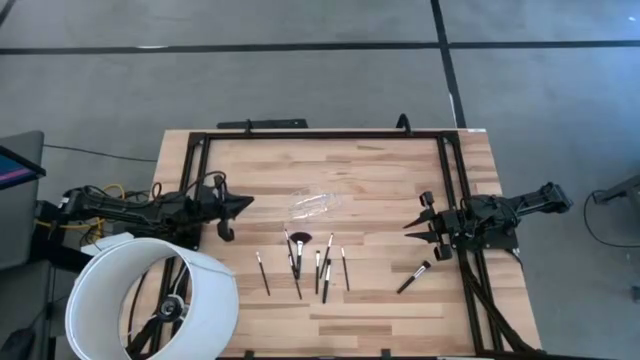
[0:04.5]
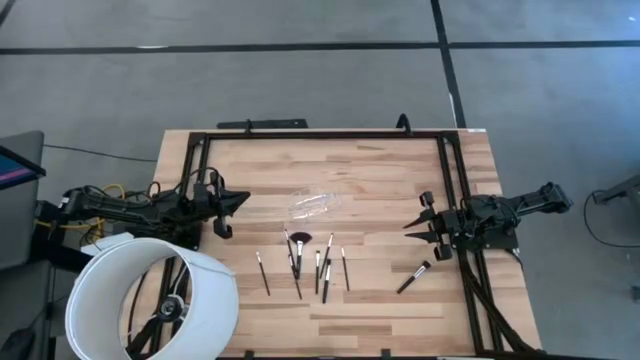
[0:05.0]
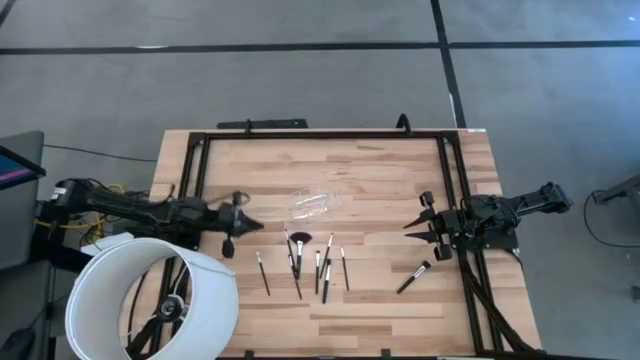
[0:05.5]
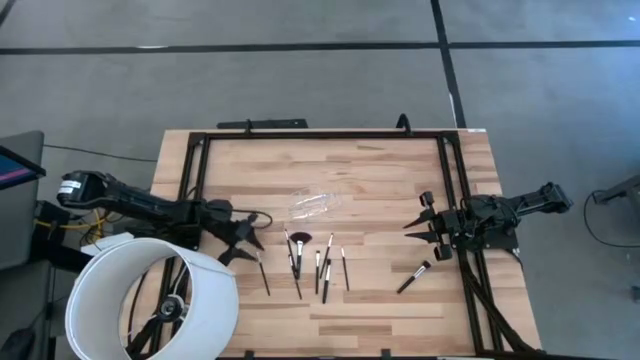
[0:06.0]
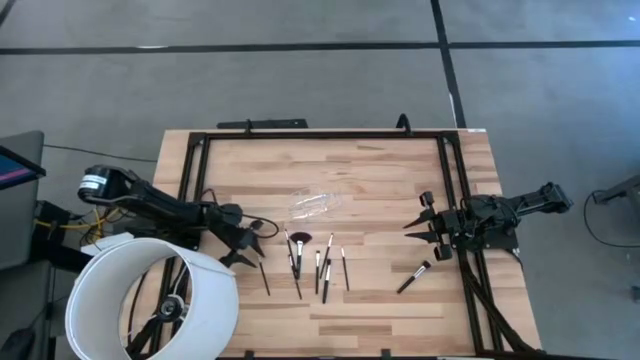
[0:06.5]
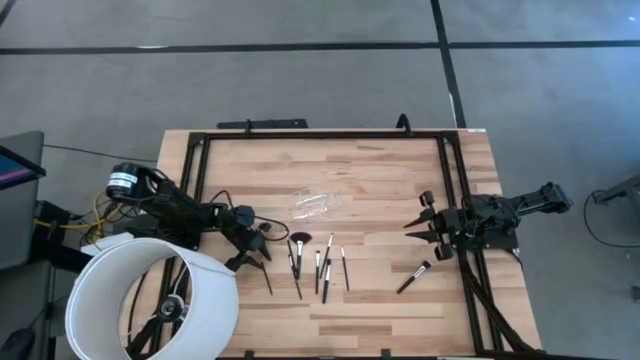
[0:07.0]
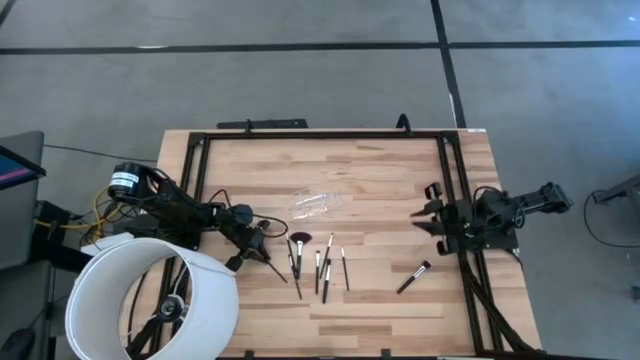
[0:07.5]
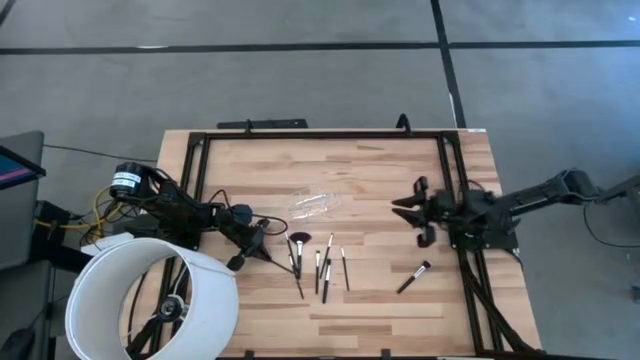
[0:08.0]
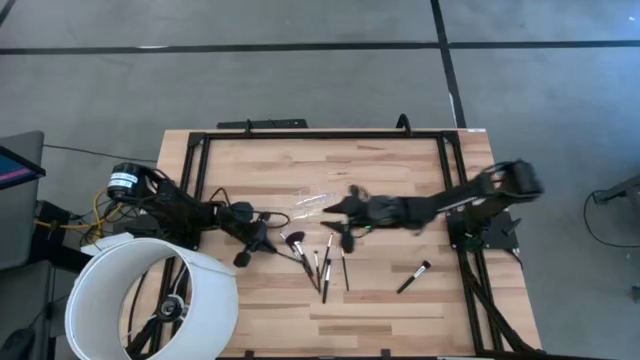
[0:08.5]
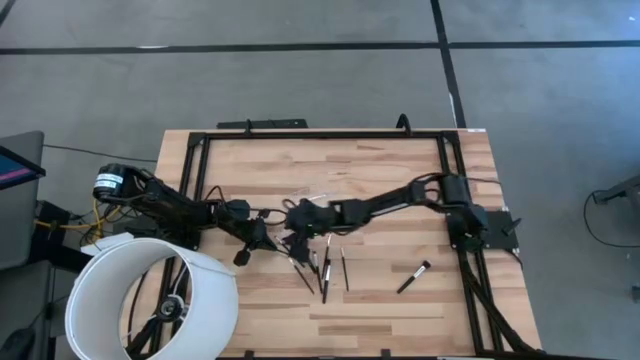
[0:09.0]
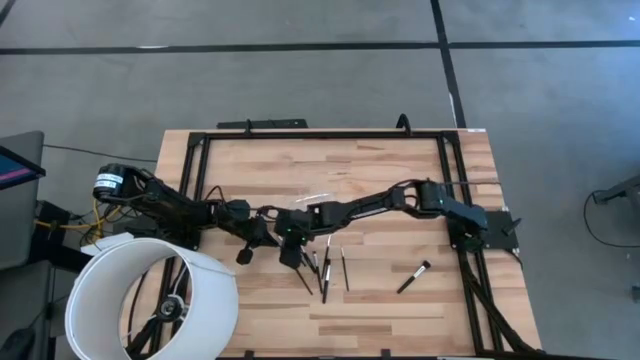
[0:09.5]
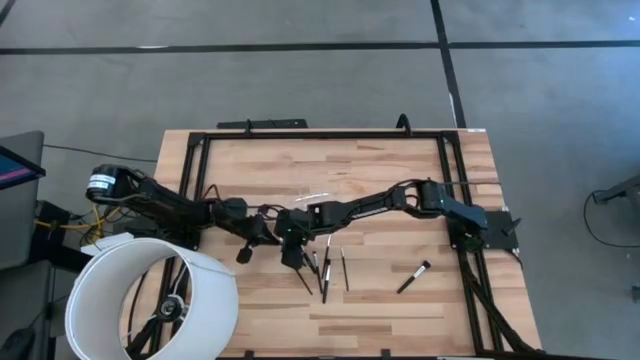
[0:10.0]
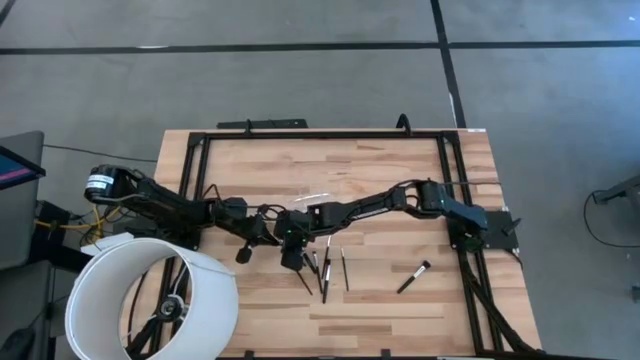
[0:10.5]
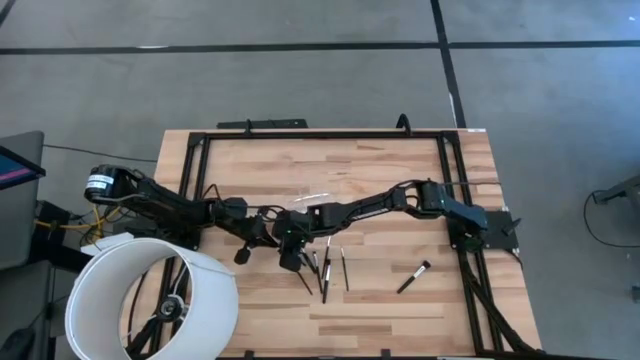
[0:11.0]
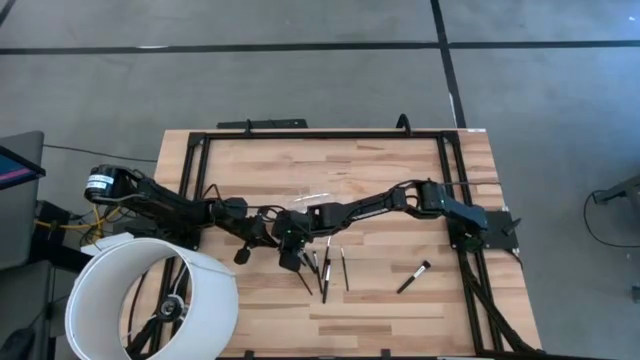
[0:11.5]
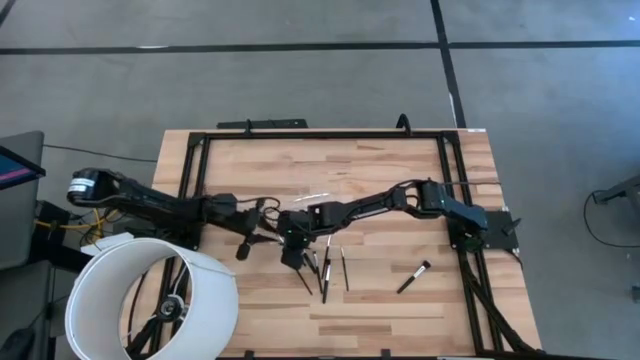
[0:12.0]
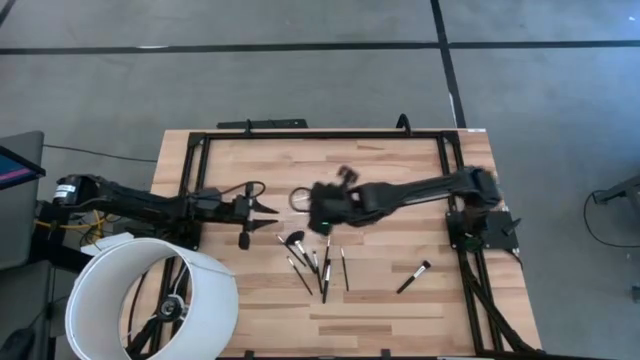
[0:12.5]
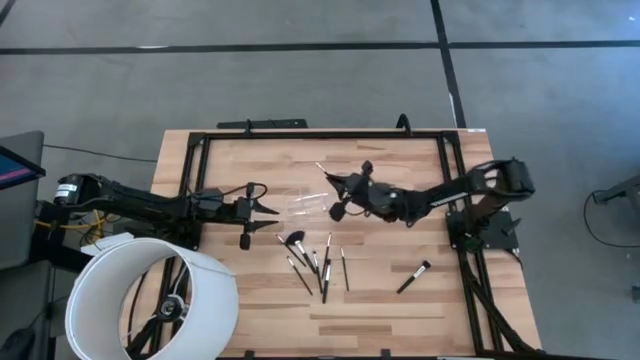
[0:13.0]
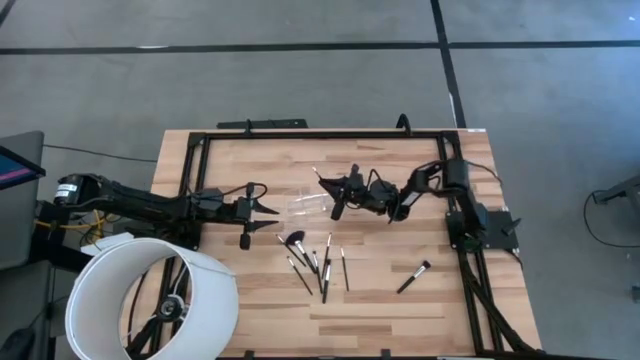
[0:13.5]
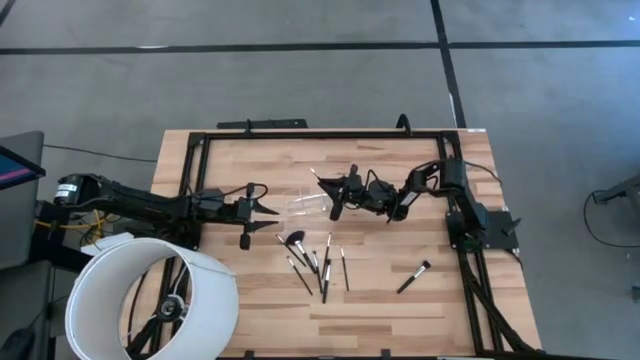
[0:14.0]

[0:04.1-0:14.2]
Task: Put items in baskets/containers
Put the black eyeshadow brush into the transparent organizer

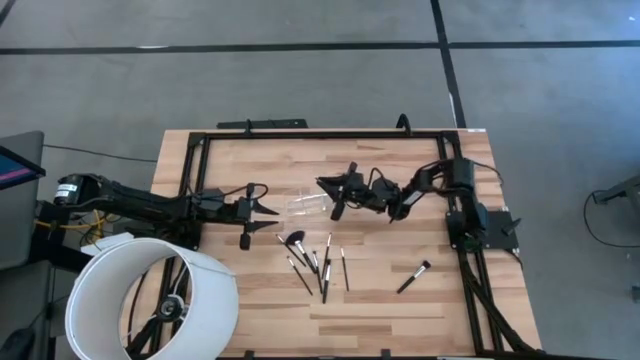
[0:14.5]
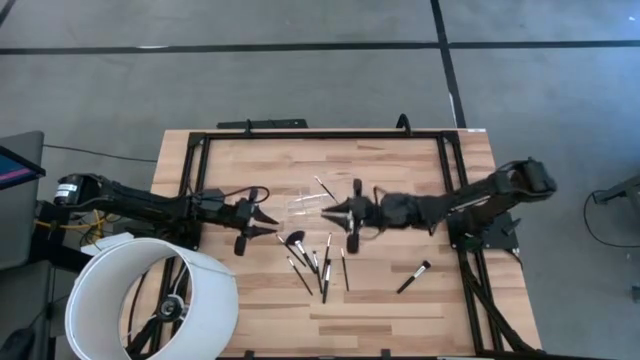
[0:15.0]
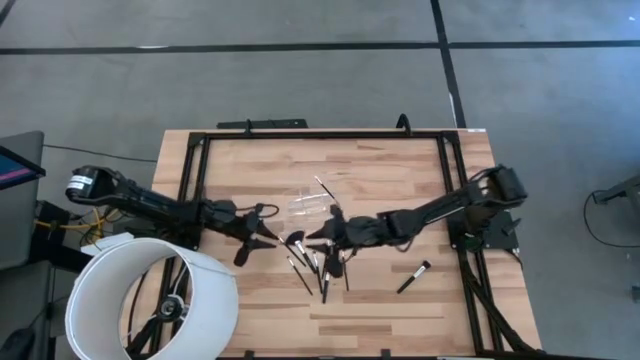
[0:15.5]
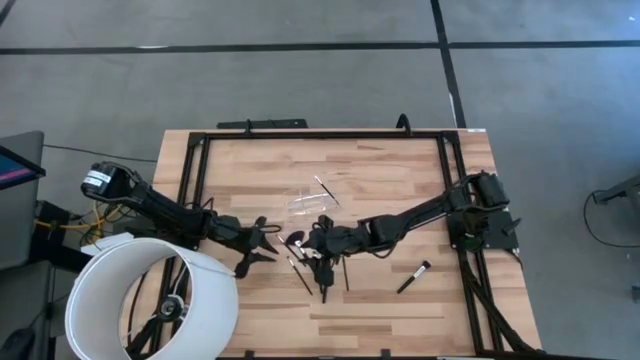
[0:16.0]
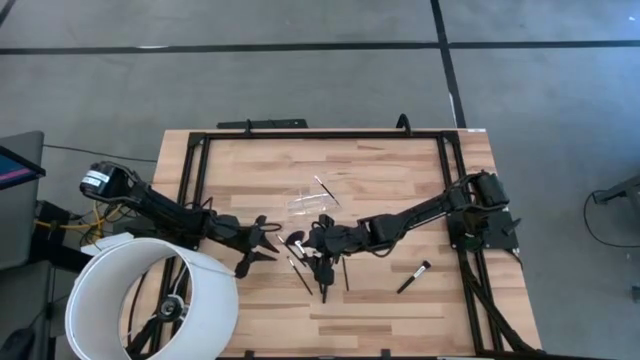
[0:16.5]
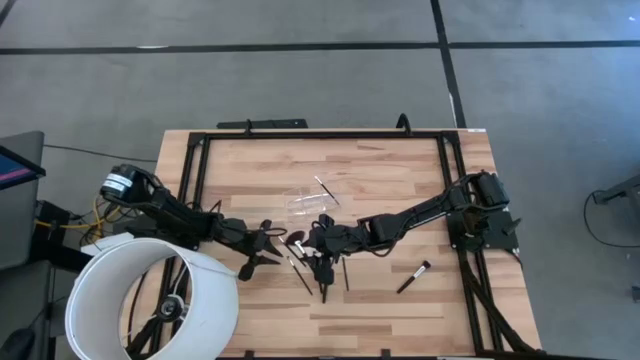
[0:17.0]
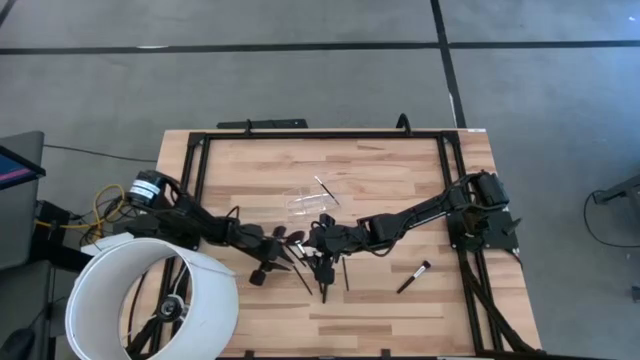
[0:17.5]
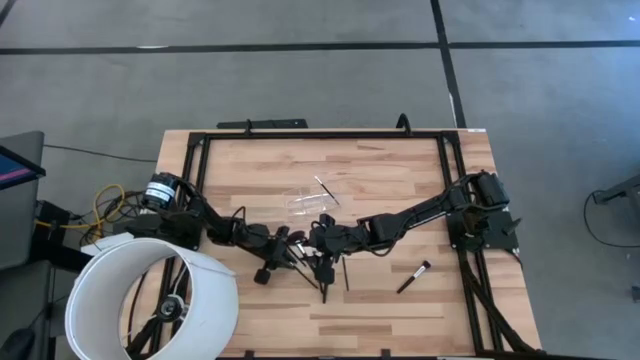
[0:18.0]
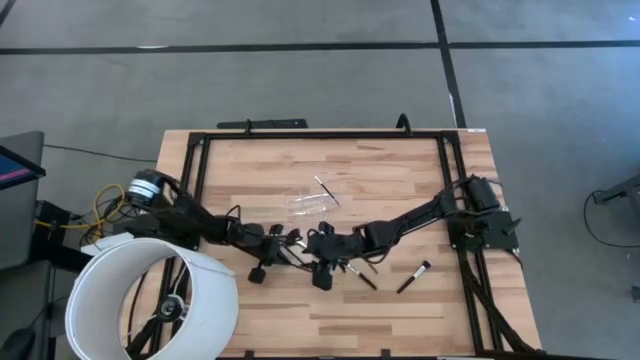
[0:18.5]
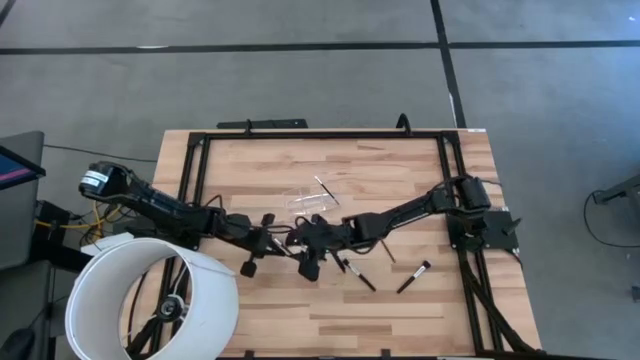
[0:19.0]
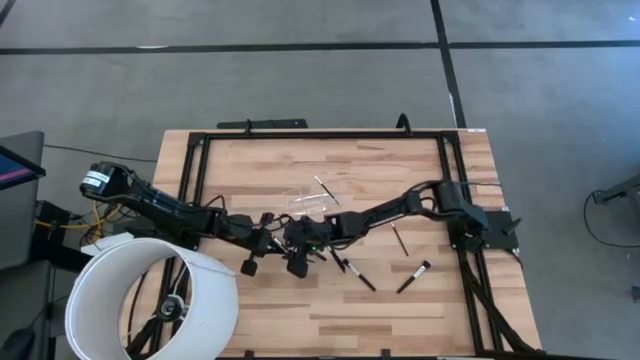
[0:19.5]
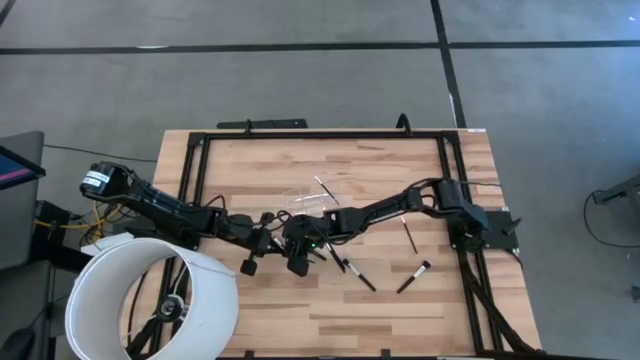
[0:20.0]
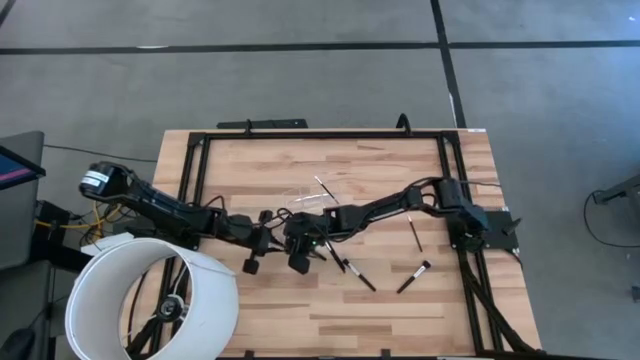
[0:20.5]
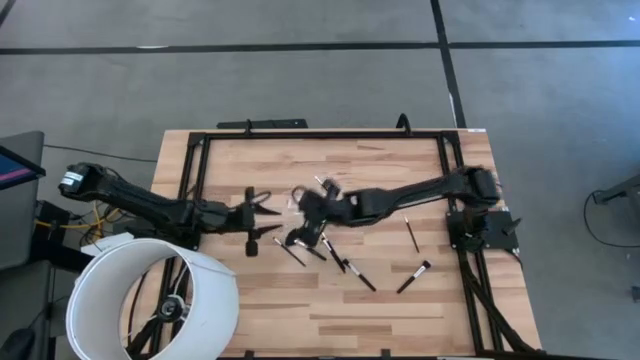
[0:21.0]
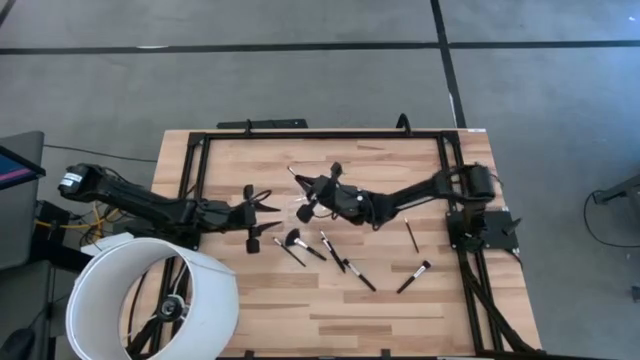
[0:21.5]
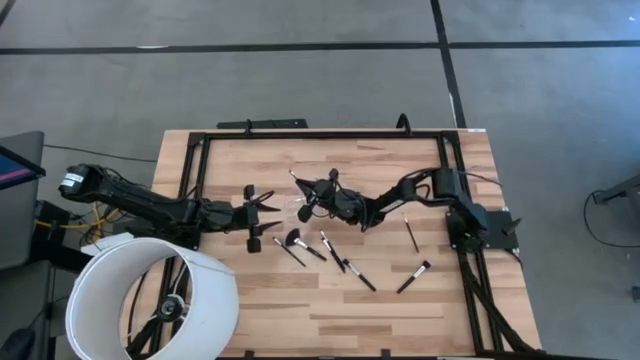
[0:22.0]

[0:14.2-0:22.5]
Put the black eyeshadow brush into the transparent organizer

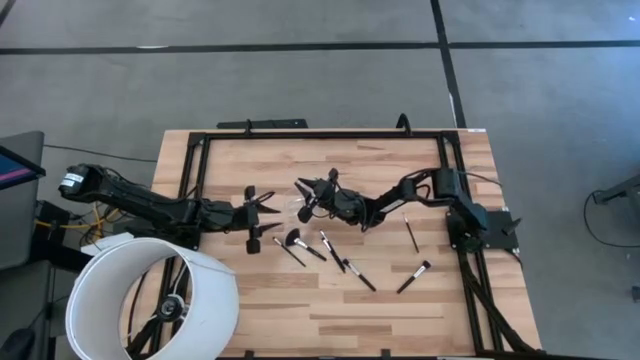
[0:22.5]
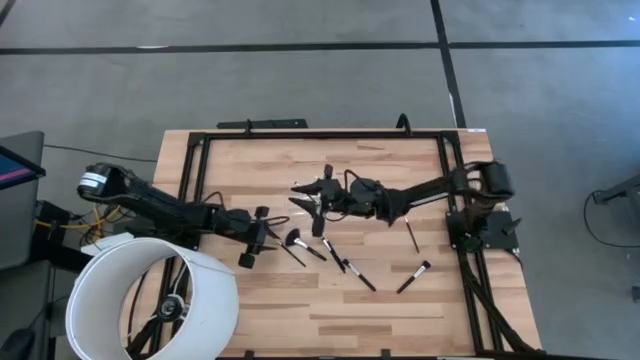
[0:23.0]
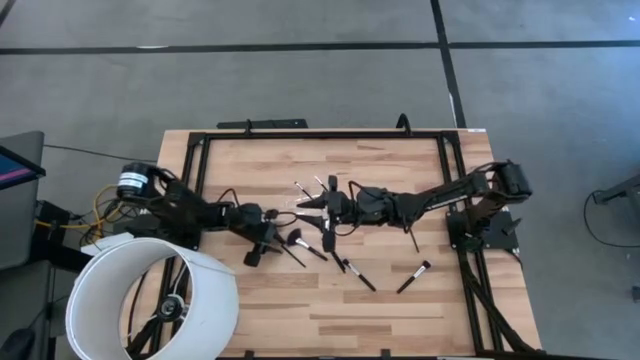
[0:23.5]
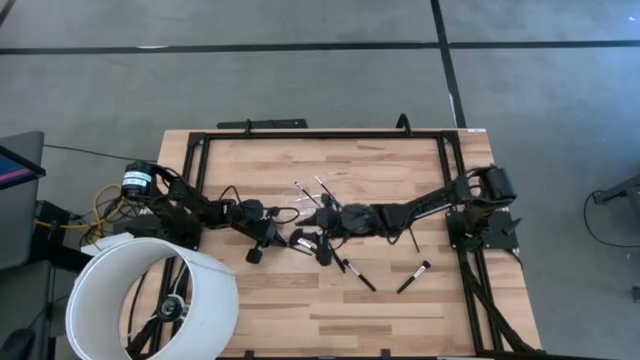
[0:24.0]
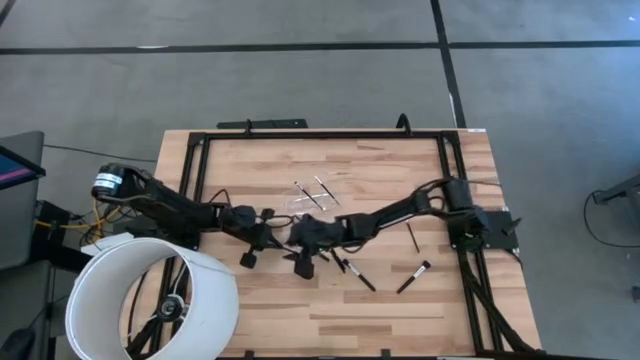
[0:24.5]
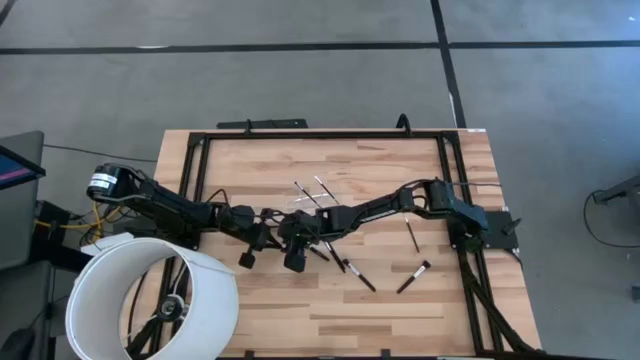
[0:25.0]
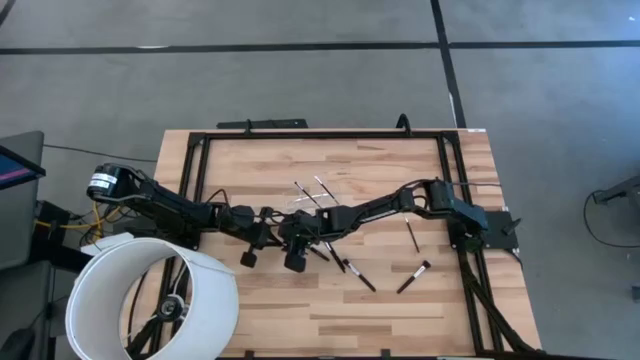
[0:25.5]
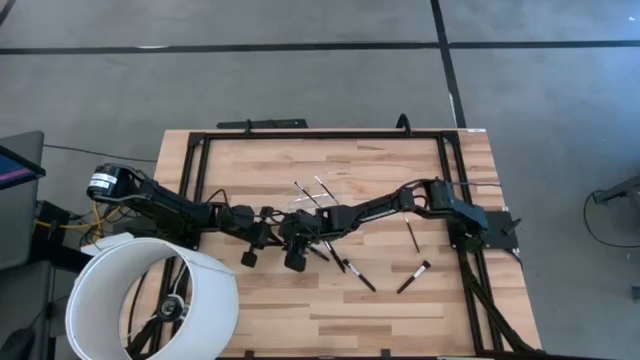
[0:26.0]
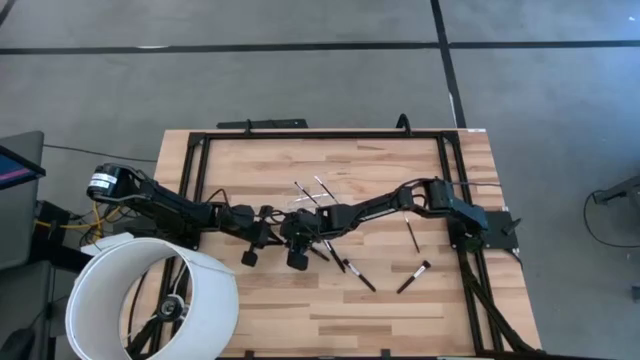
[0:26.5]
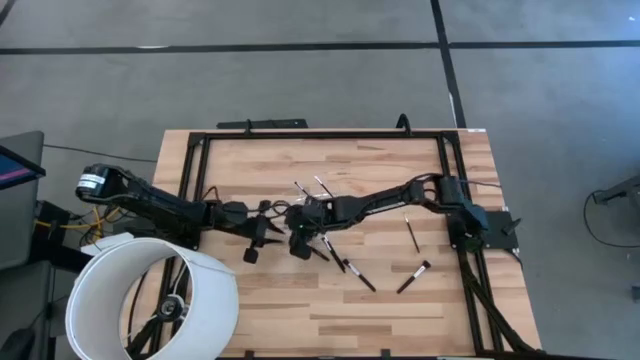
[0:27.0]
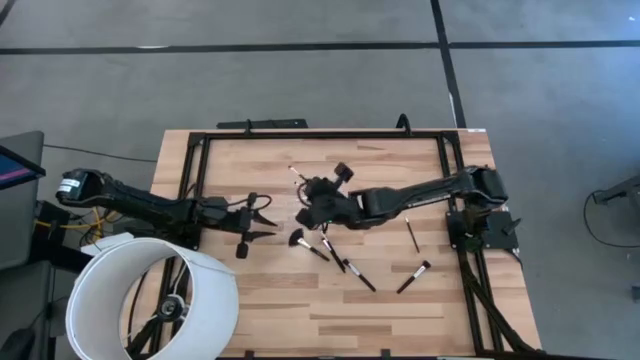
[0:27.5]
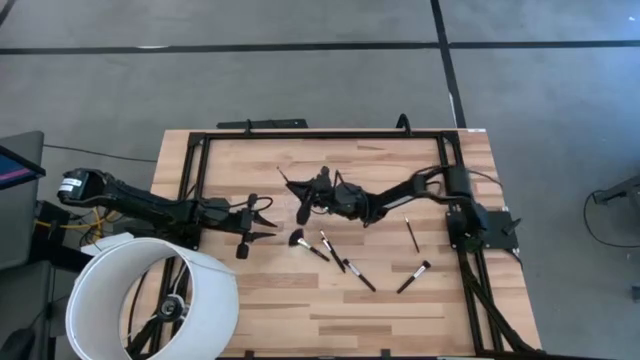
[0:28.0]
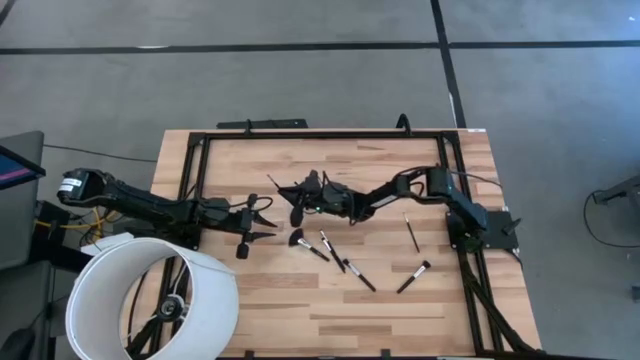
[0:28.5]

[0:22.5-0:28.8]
Put the black eyeshadow brush into the transparent organizer
